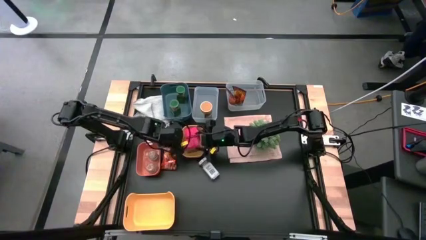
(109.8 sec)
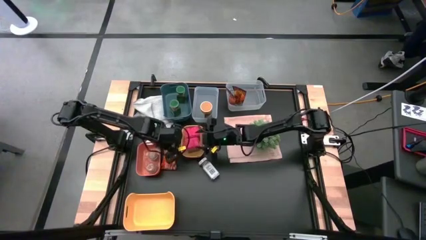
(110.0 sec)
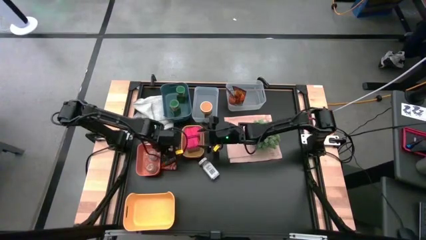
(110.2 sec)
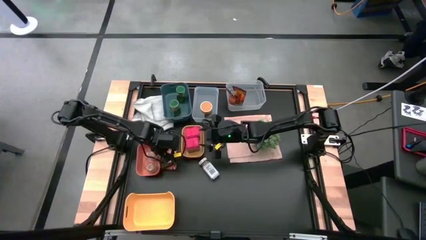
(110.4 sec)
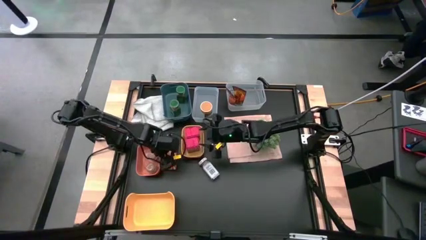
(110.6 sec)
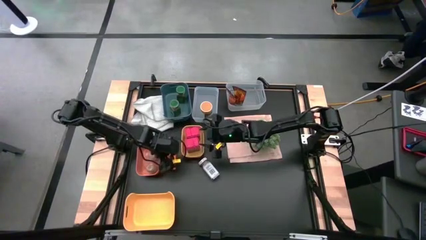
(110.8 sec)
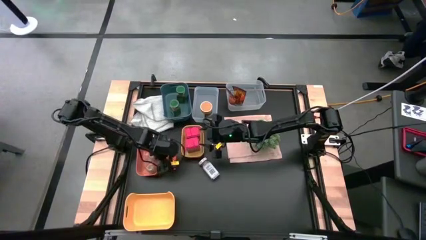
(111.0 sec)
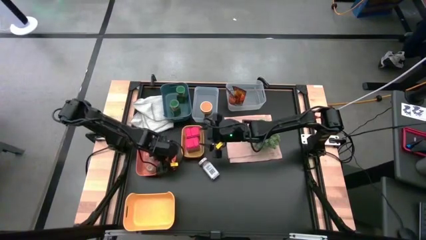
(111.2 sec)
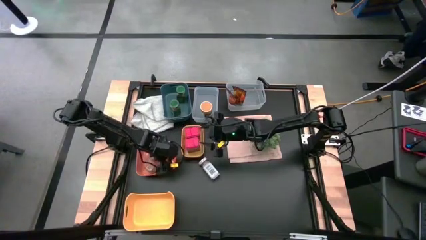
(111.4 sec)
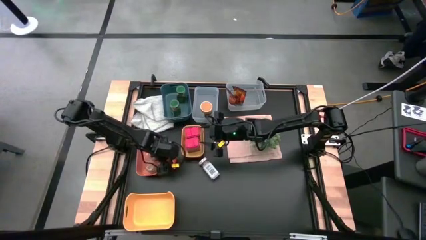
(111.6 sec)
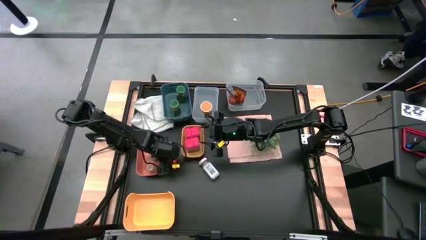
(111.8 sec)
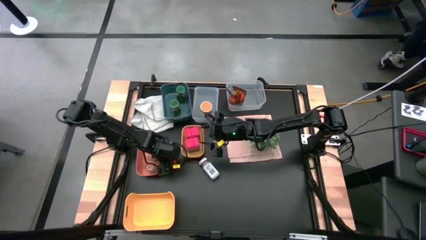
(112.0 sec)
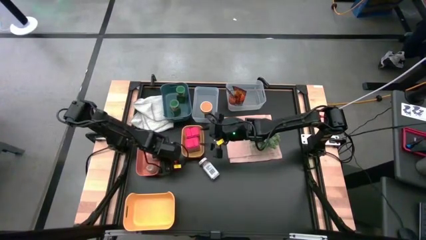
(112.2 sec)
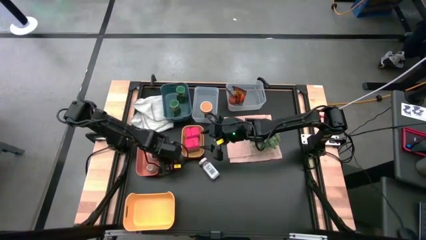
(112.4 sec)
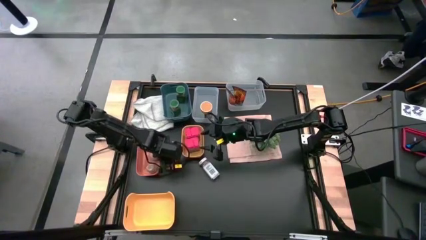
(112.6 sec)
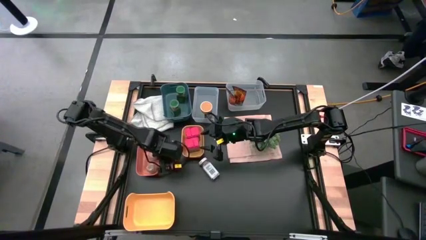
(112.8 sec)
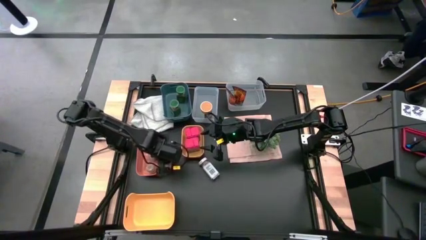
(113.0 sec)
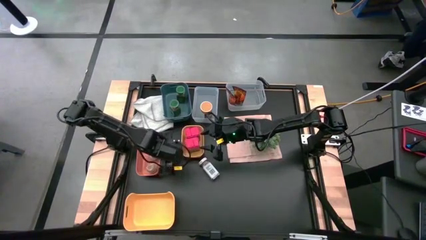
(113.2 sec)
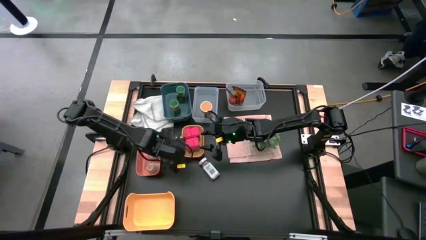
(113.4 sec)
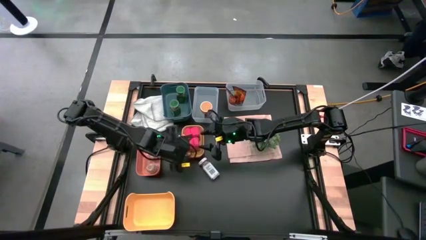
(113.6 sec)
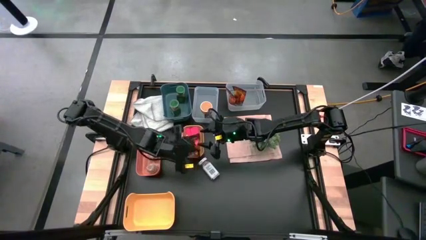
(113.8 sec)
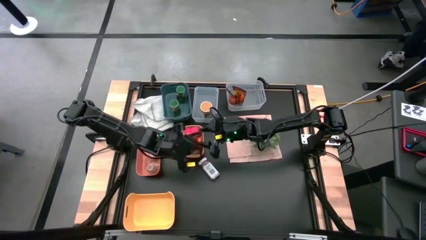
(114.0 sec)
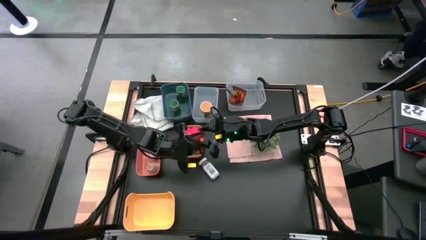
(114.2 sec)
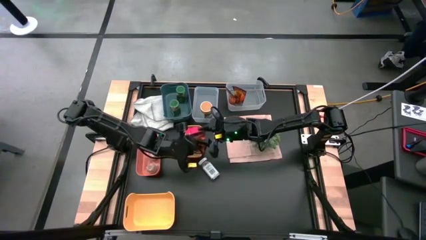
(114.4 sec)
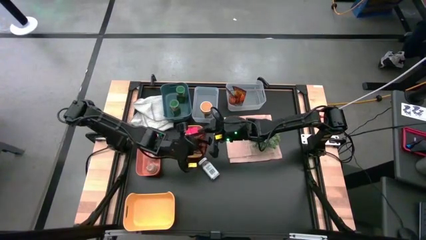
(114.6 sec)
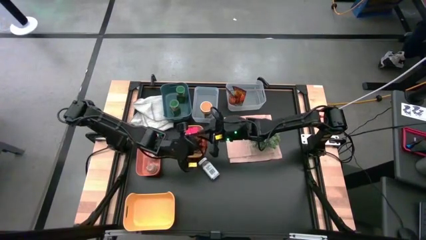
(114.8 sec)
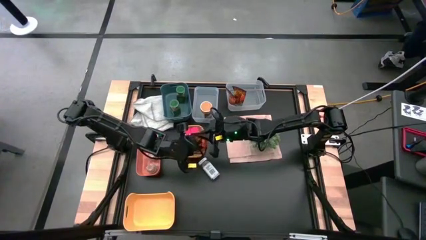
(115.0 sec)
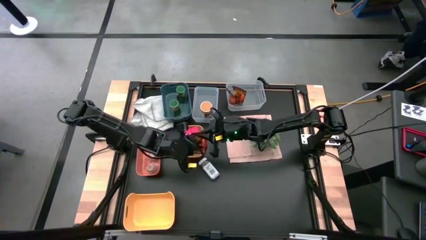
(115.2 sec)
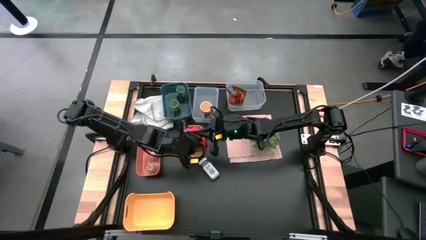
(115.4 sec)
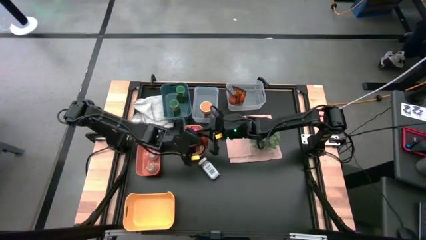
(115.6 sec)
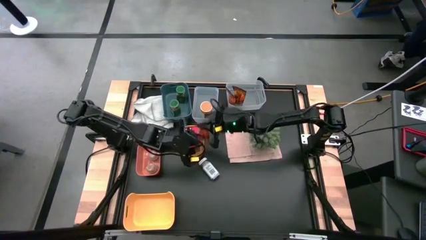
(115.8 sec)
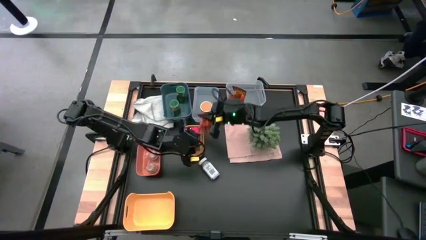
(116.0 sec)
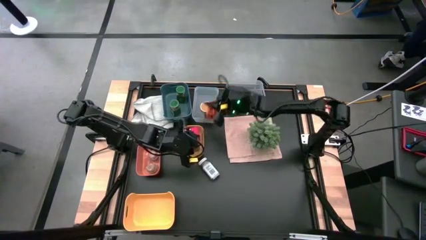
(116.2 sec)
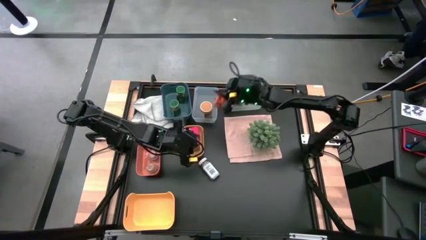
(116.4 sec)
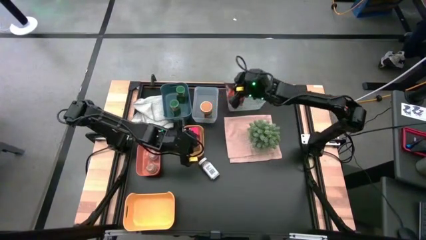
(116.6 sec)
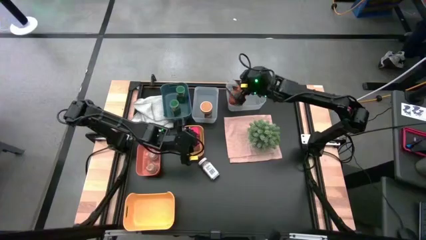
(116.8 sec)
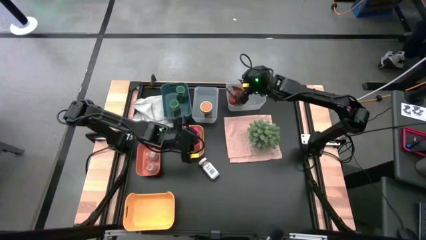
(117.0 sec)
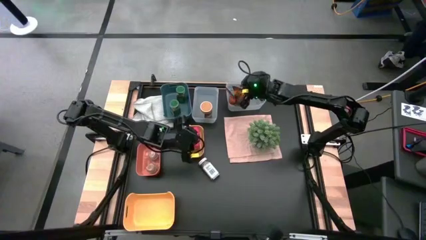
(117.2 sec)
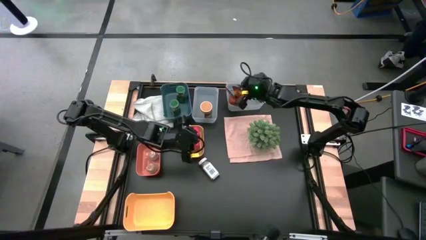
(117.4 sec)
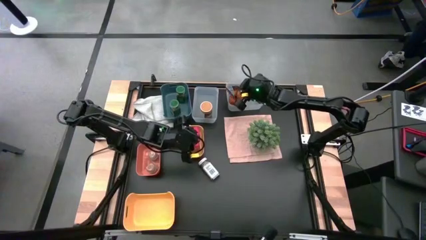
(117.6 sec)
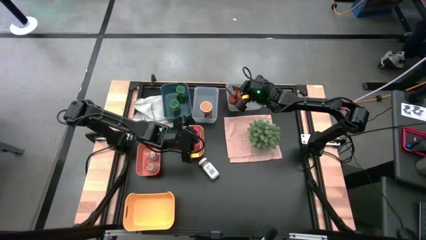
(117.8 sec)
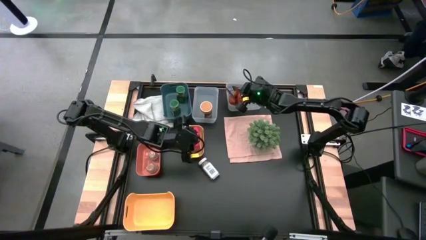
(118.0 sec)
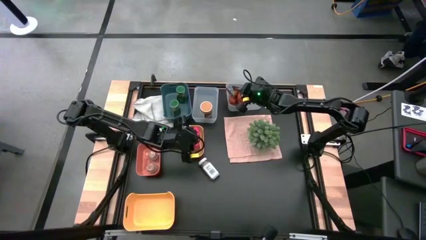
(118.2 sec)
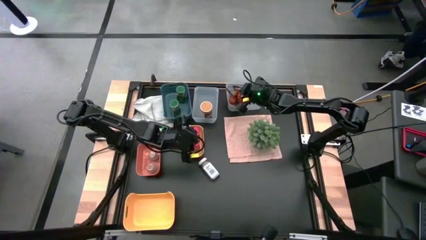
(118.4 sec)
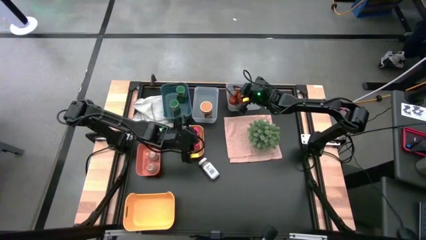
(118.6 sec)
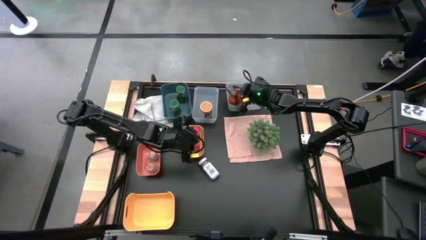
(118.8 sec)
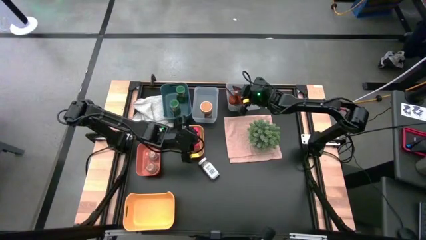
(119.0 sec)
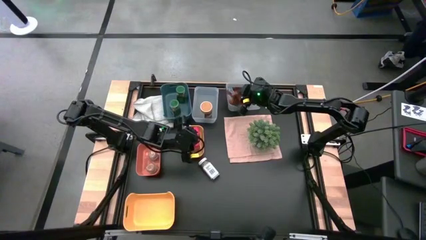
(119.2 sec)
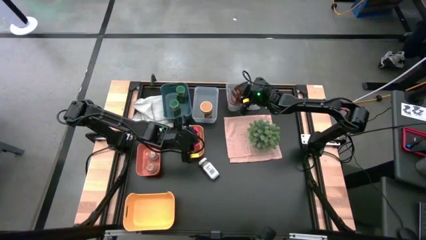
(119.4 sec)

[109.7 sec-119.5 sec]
Task: Sort spices by type
Put the orange seasoning pack into the right transparent bin

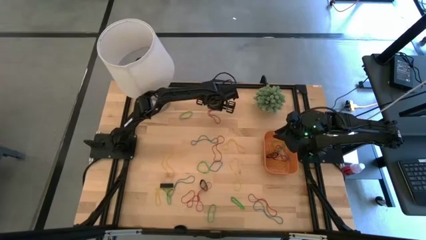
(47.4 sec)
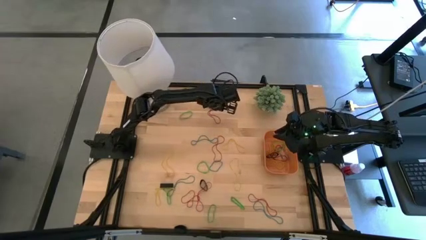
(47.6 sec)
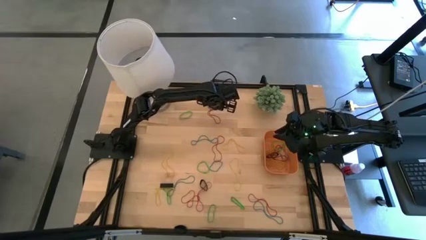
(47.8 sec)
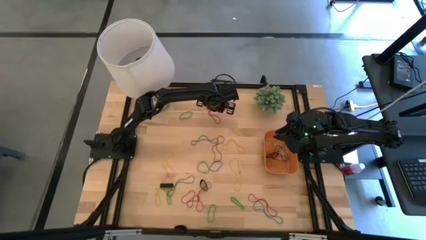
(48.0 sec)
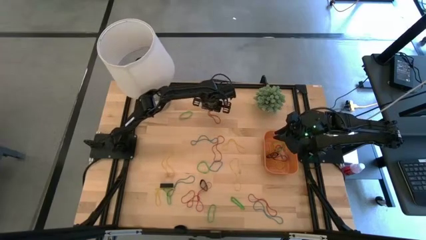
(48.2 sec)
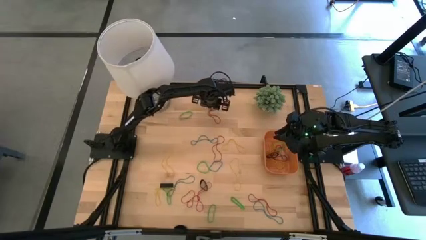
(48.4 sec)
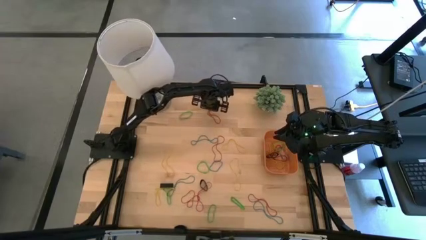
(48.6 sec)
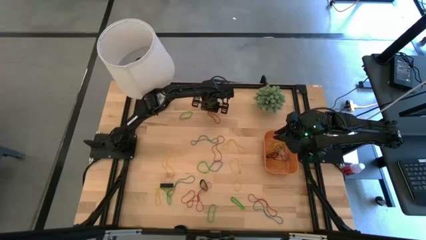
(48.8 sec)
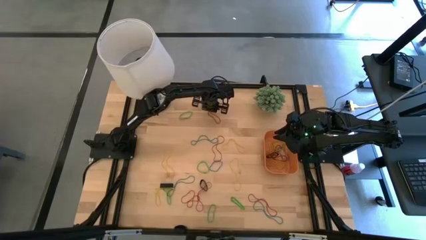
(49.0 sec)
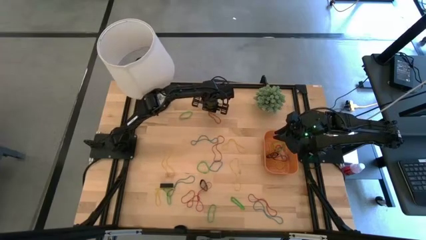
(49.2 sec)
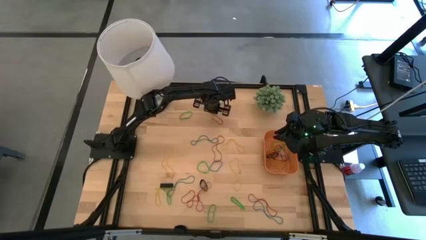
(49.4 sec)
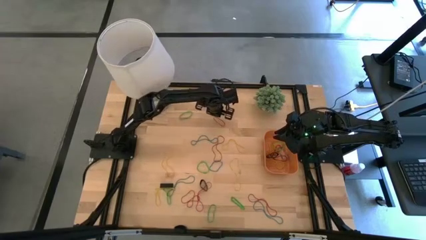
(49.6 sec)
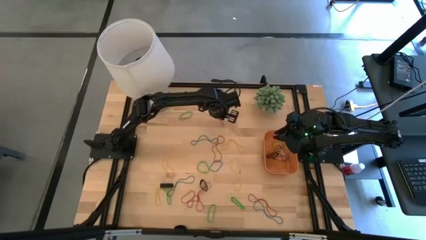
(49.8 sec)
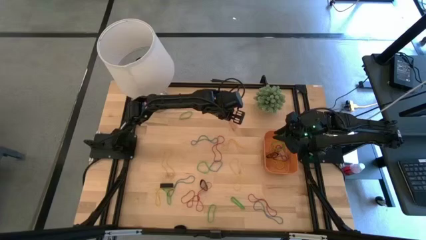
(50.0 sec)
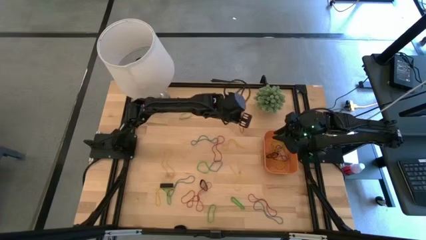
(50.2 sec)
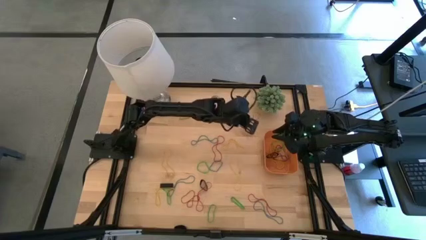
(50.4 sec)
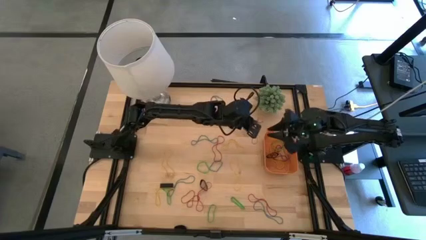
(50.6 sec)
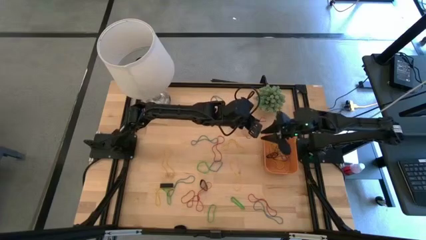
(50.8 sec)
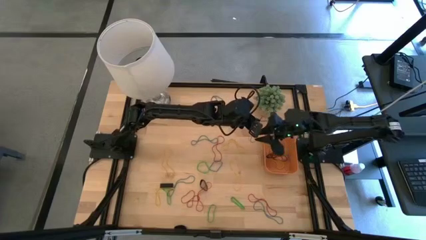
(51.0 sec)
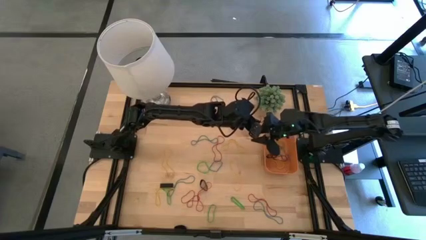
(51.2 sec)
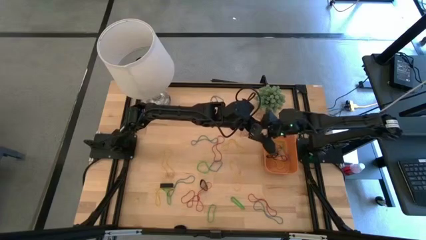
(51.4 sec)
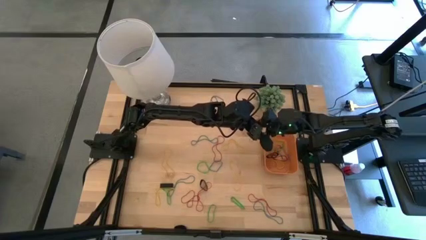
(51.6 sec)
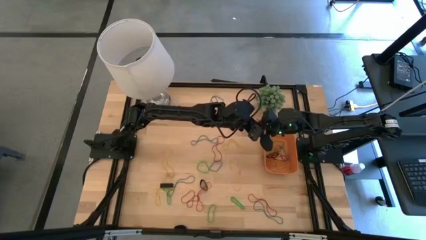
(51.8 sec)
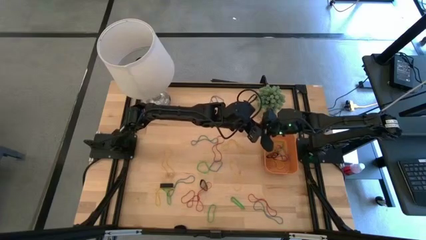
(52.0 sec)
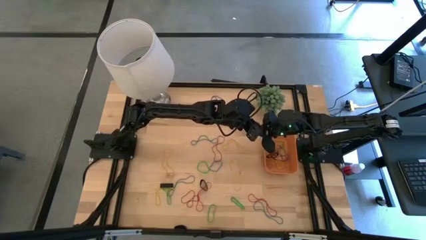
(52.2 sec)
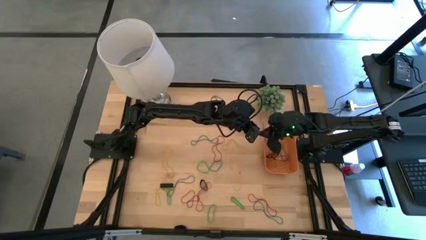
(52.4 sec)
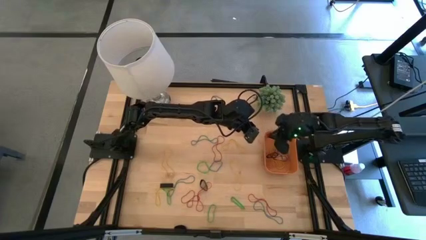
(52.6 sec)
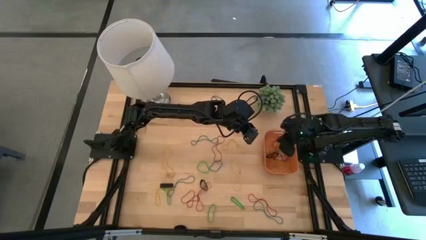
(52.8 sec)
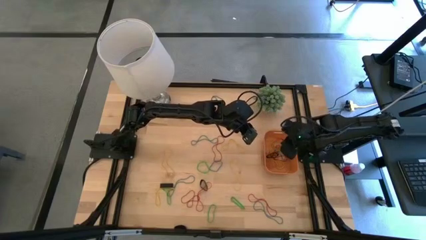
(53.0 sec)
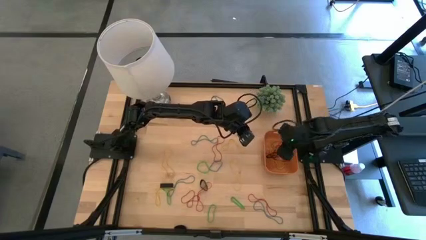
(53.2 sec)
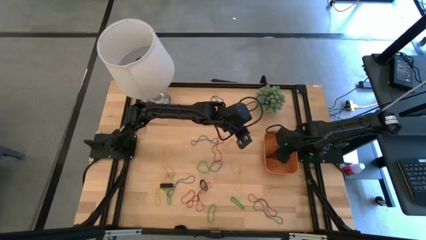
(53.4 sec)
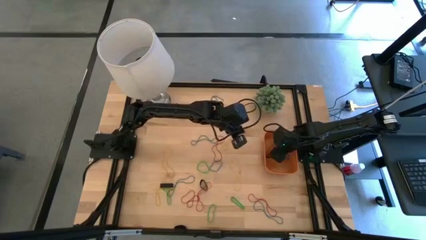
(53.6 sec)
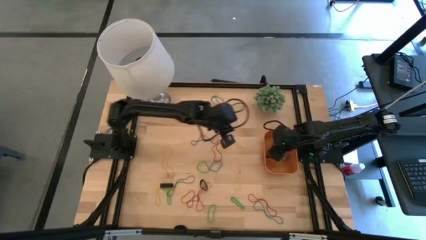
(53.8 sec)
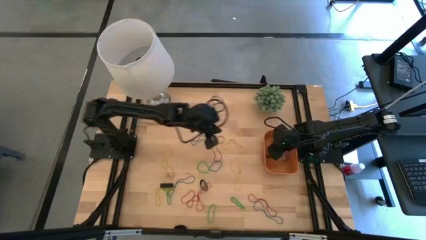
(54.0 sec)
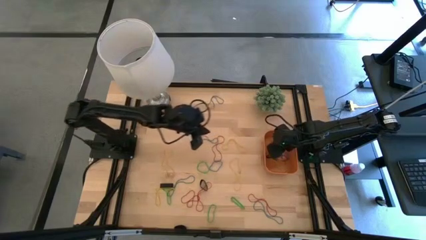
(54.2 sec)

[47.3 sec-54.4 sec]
Task: Pick and place rubber bands into bin
Put the red rubber band into the orange bin
